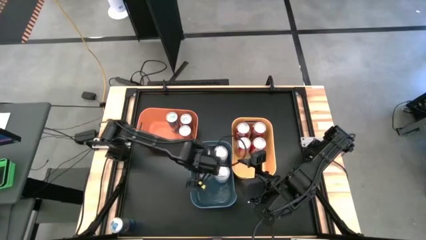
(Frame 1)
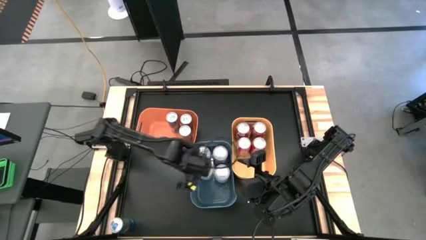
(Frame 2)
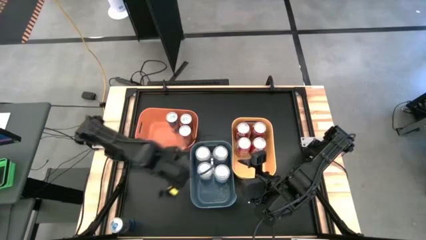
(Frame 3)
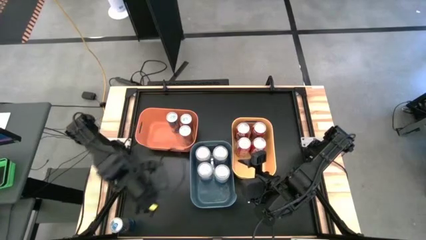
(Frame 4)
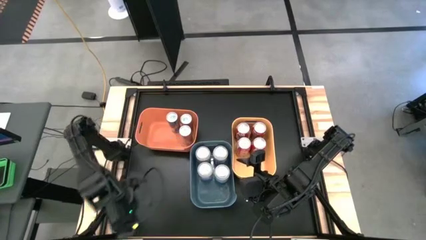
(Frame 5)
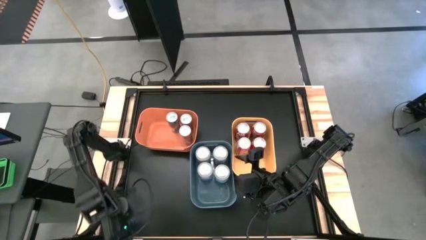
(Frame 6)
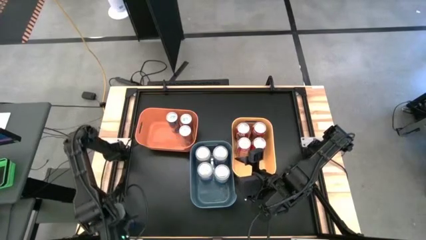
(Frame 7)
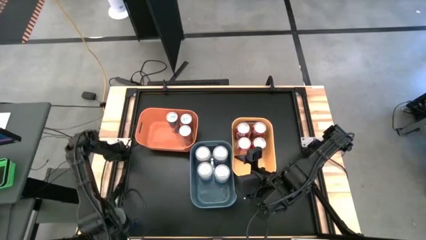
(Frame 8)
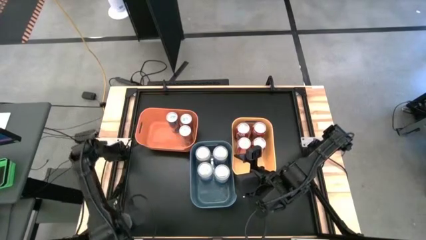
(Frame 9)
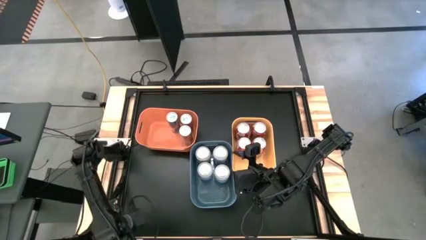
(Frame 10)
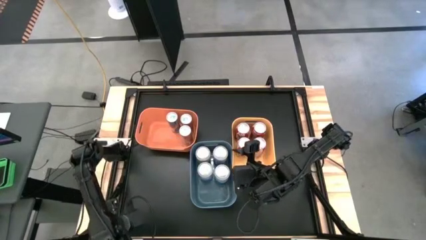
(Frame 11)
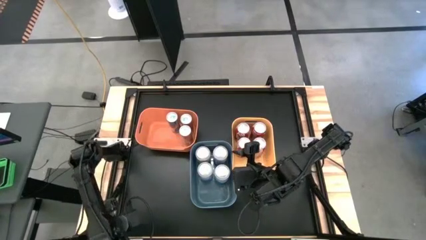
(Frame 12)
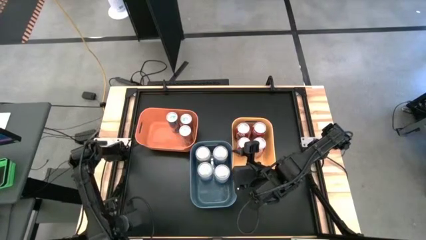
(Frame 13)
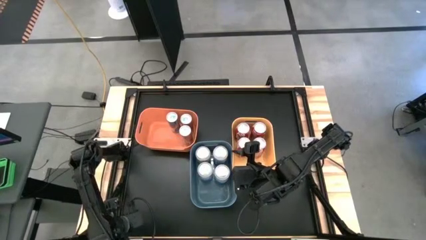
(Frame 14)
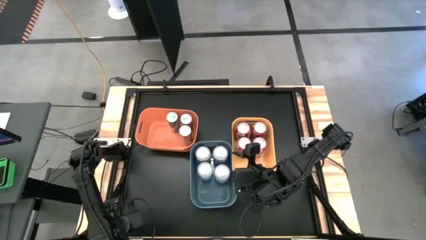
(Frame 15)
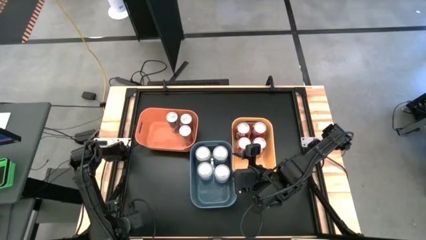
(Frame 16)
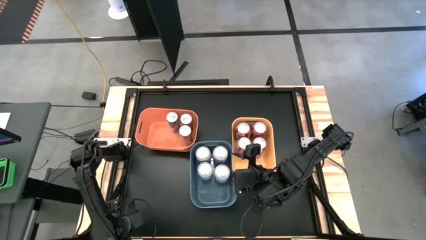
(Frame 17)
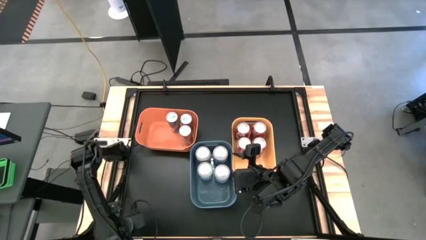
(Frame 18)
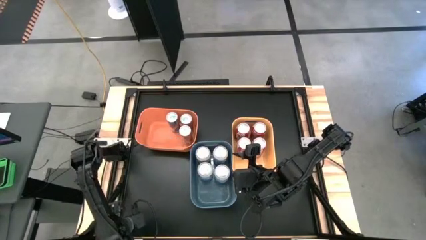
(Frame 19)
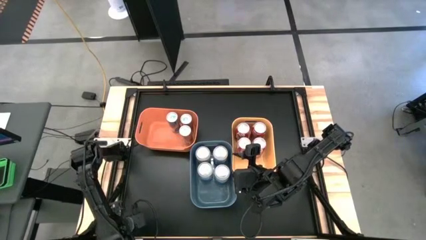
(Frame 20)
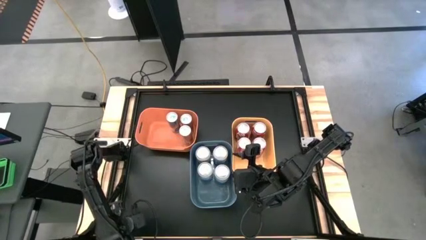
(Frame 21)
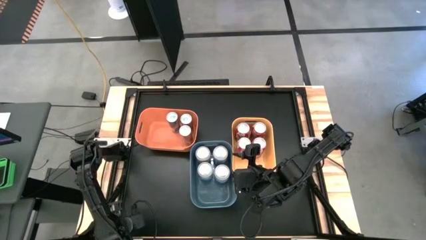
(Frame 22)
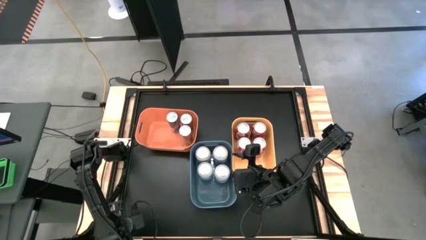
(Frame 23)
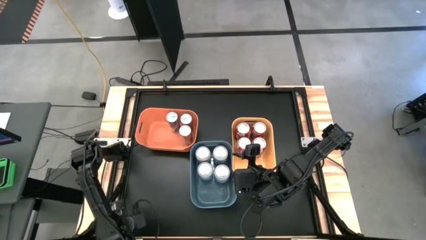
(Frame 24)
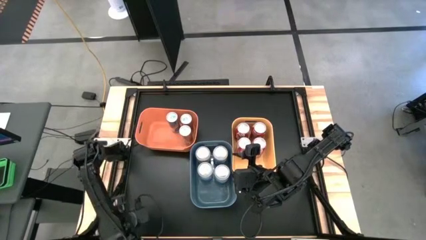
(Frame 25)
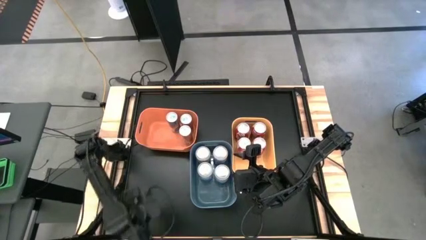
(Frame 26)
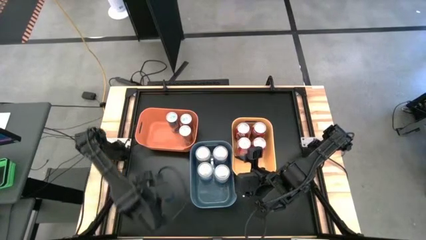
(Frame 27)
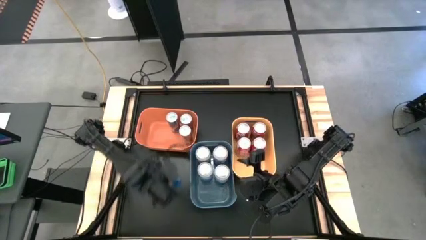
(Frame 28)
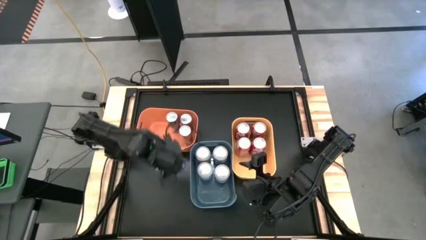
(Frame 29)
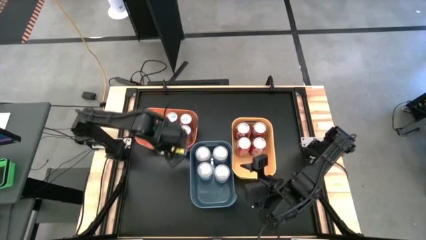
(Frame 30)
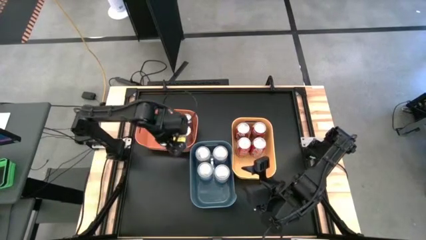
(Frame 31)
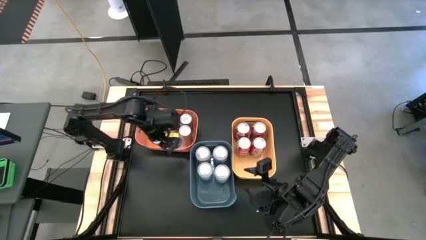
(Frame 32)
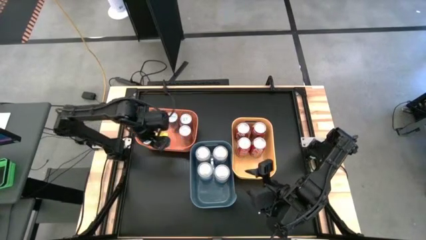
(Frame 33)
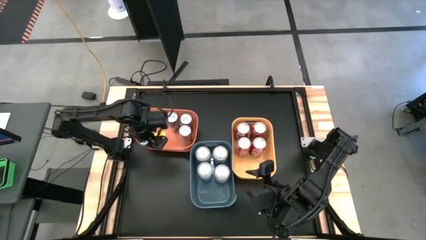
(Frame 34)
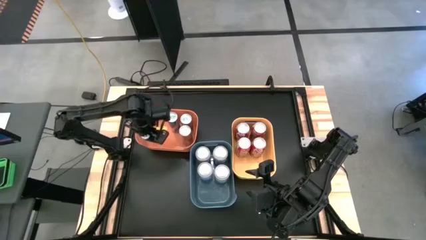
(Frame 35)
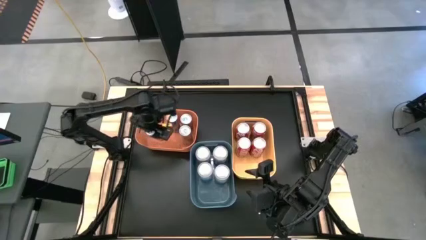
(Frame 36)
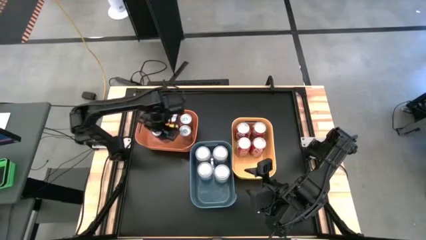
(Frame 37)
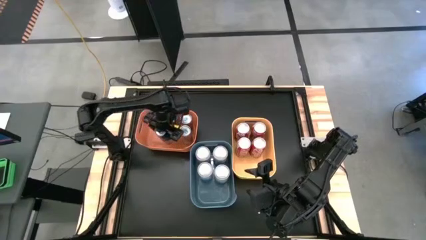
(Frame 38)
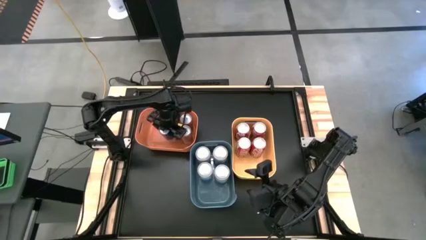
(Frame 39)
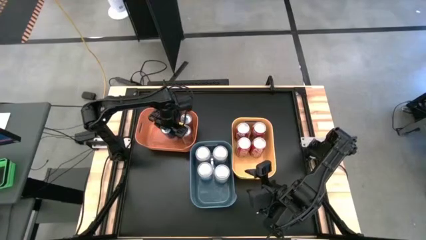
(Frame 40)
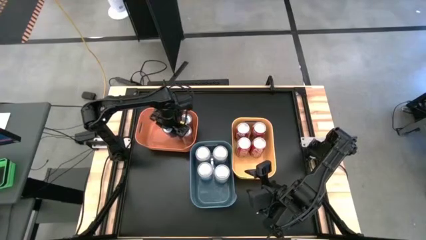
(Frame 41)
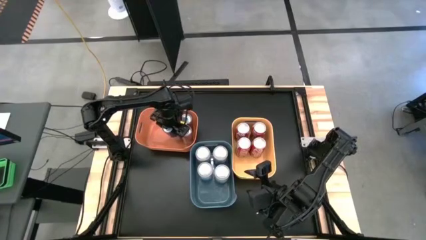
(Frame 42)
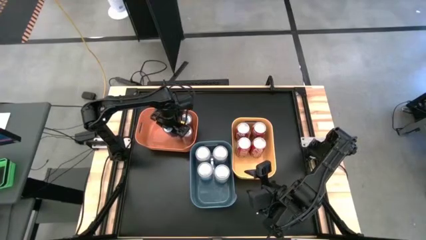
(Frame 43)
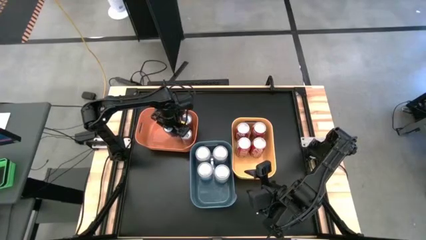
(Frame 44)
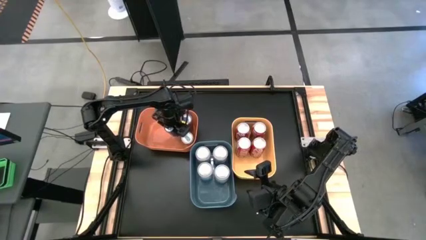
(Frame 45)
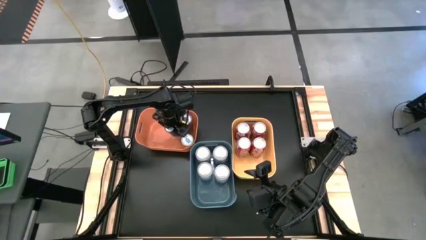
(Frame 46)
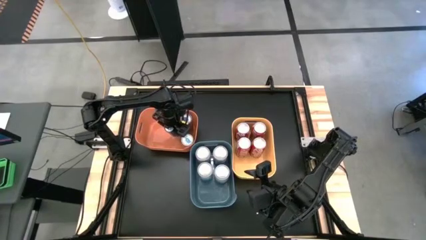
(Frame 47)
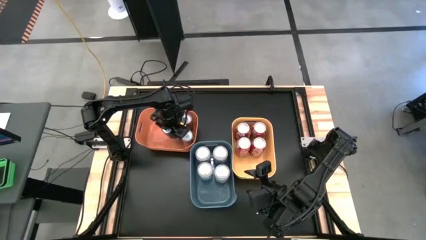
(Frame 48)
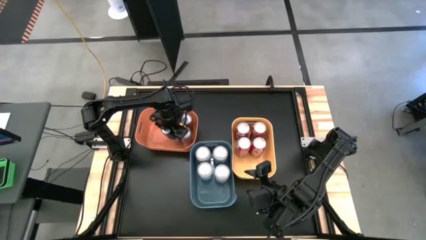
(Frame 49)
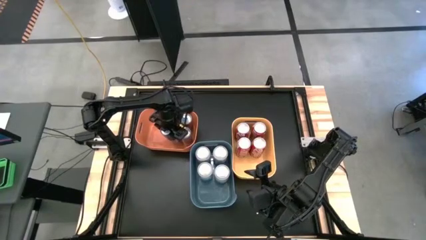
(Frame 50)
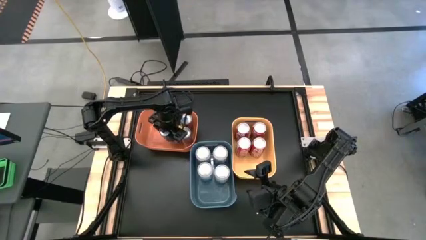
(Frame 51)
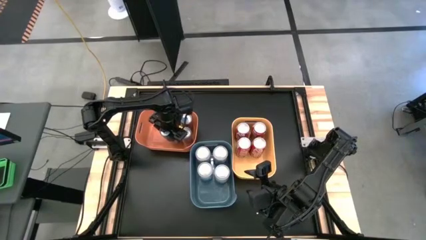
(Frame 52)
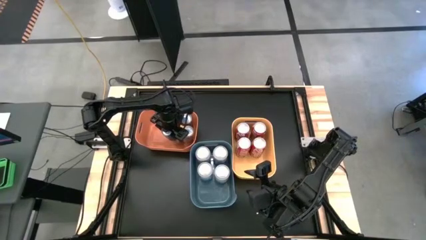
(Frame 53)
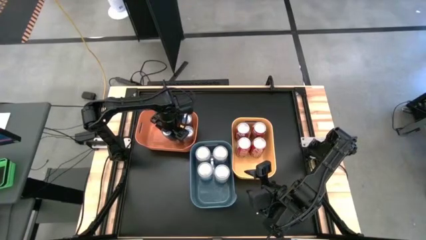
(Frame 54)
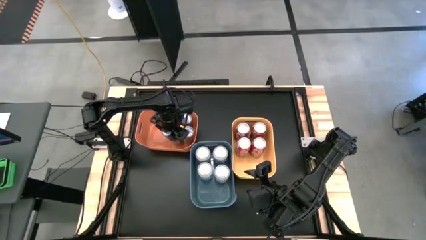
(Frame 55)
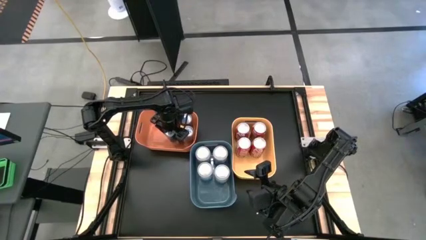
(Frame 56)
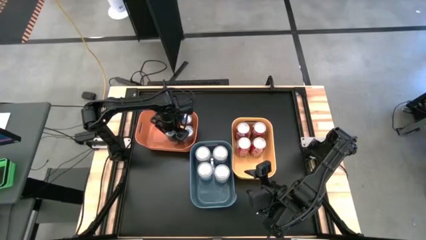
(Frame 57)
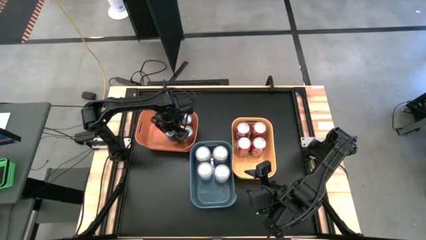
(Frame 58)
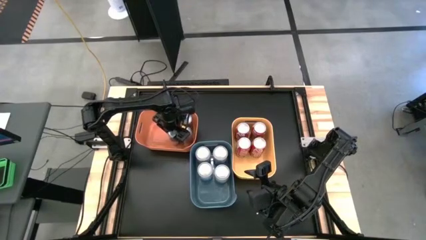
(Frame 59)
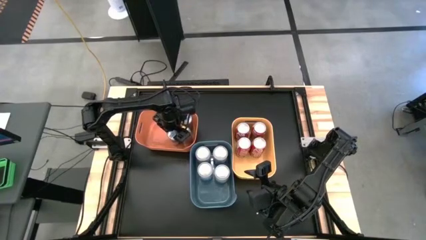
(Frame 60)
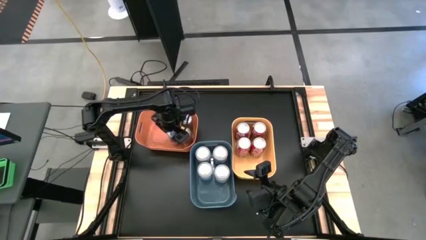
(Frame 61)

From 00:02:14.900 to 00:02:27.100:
Task: Sort soda cans
Put the blue soda can into the orange bin

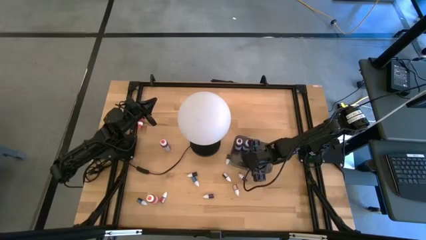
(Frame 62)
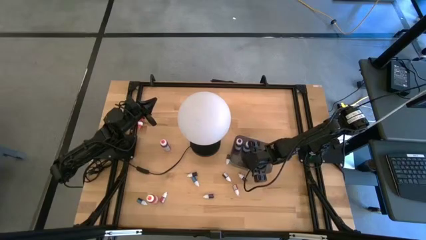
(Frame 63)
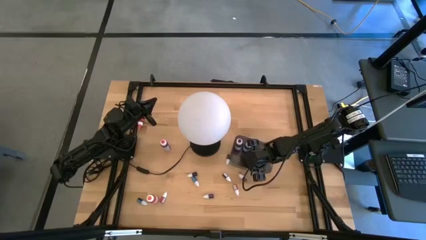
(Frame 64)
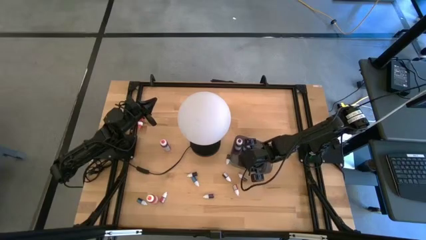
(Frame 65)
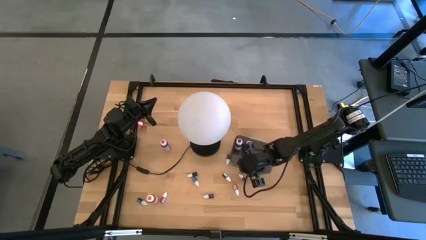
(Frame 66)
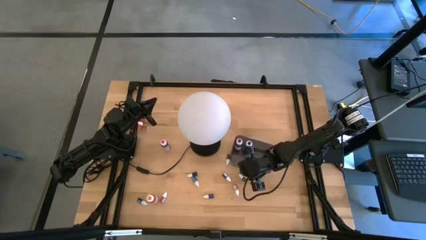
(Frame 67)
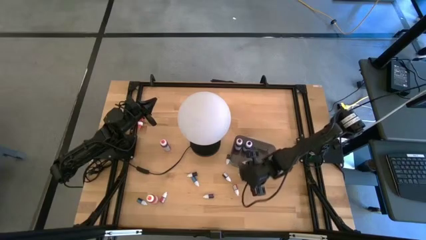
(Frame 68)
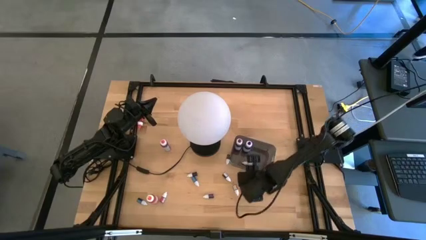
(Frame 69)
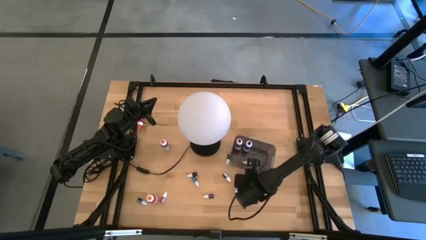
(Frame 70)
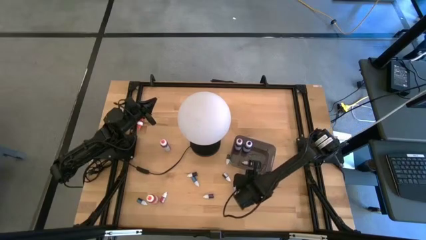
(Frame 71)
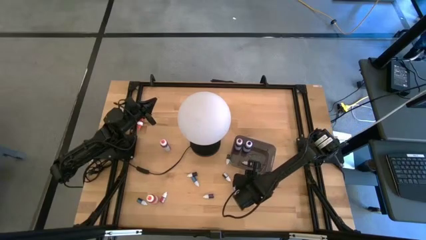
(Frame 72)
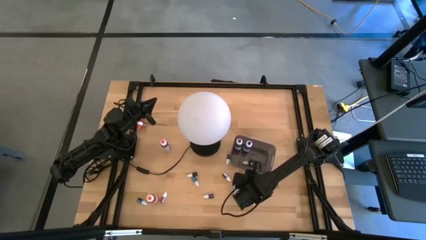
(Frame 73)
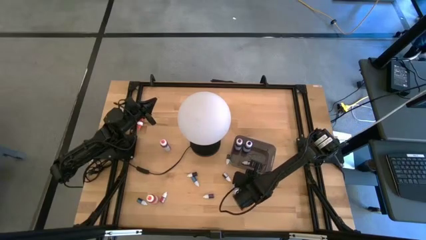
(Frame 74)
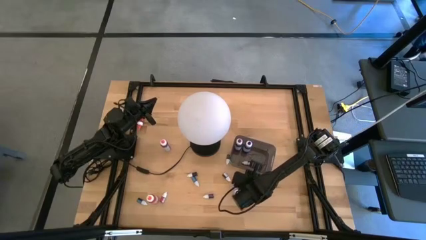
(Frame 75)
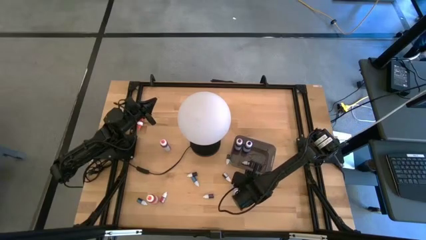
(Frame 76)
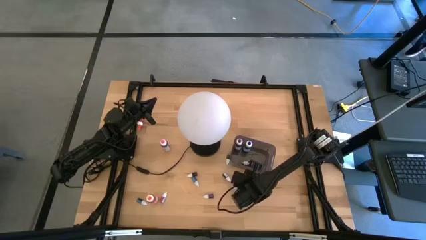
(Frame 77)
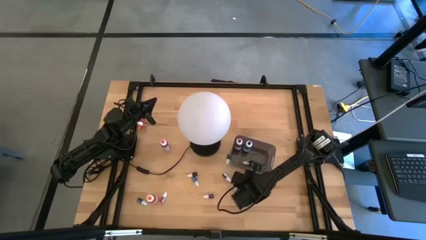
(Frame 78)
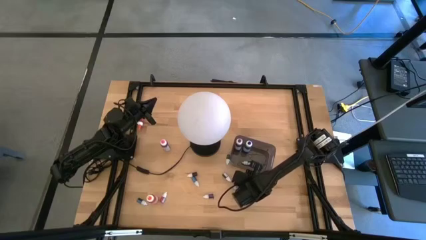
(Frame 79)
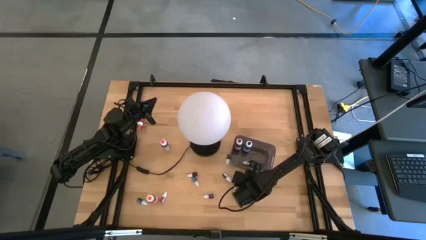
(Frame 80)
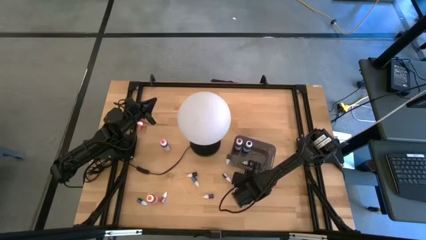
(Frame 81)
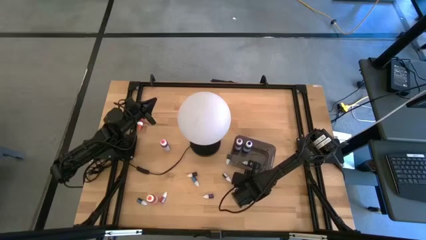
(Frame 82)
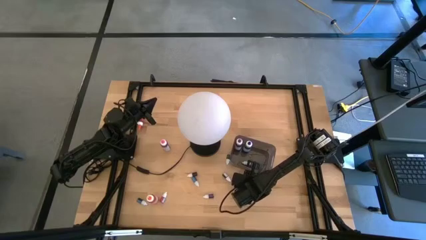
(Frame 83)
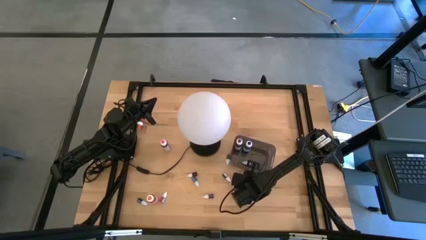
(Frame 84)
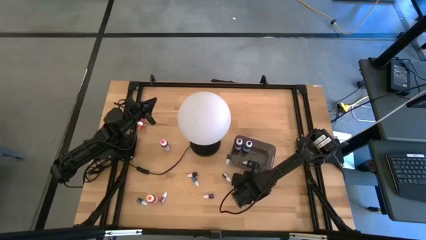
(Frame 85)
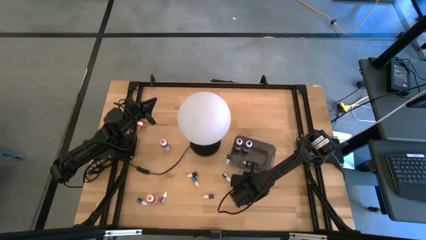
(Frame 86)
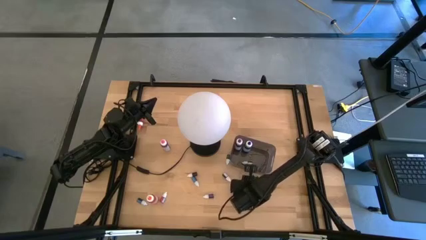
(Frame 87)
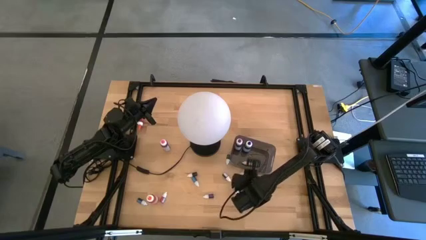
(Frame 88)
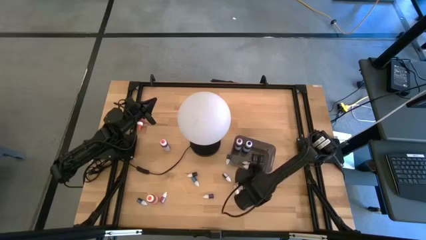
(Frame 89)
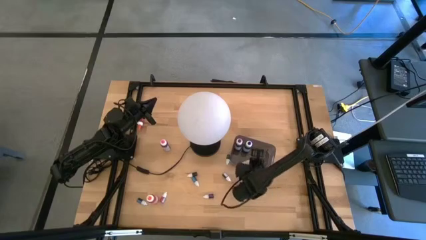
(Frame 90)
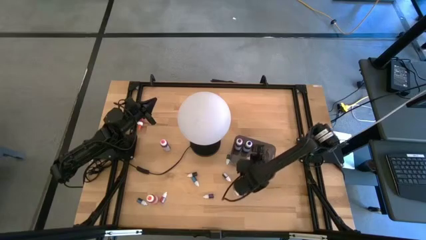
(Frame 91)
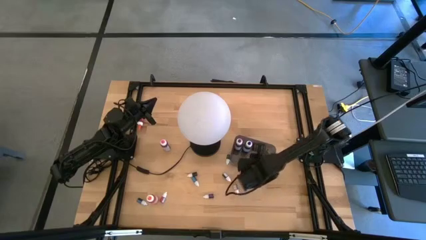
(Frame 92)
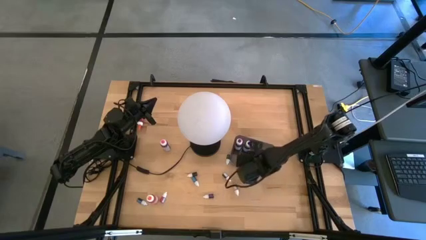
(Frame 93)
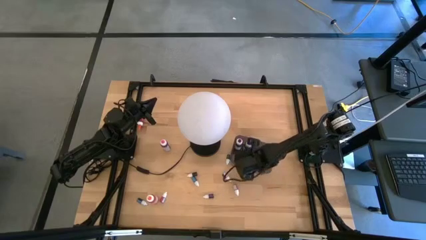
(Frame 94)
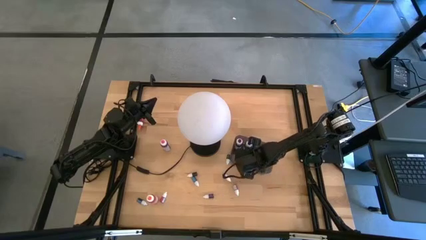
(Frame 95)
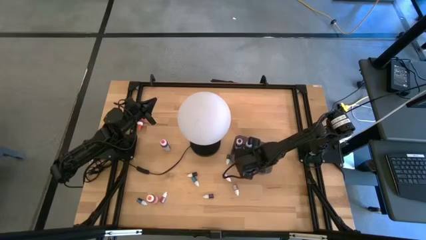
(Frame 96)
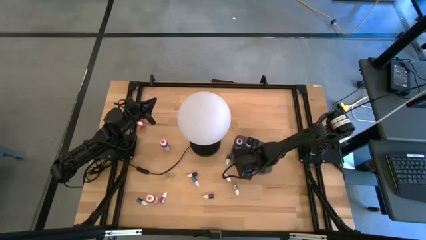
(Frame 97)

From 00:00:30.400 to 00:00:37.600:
Task: Pick & Place food coloring
Put the small brown food coloring bottle into the black container
